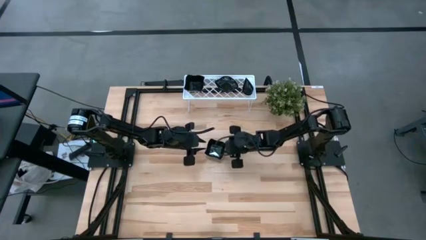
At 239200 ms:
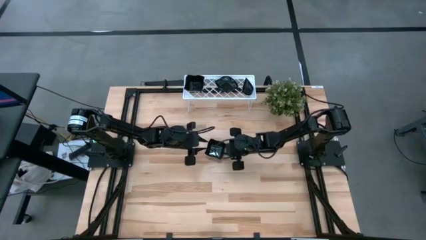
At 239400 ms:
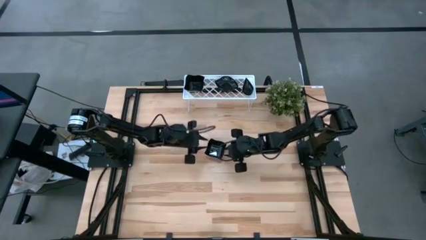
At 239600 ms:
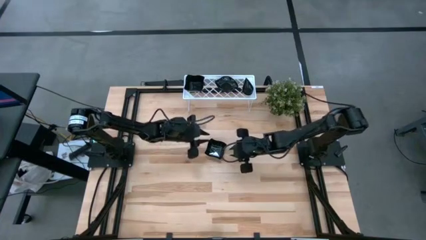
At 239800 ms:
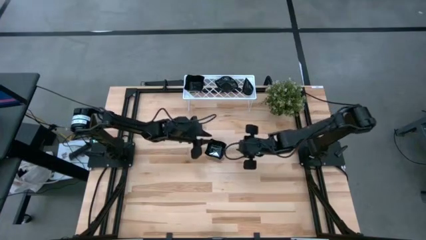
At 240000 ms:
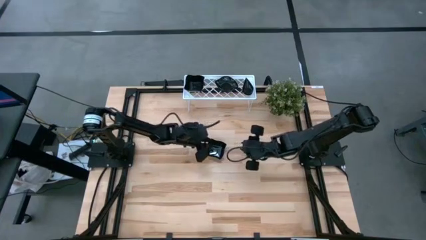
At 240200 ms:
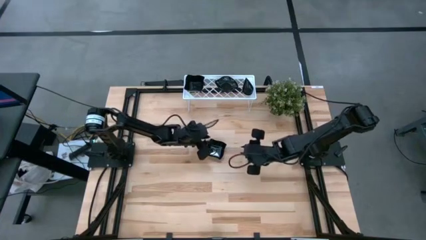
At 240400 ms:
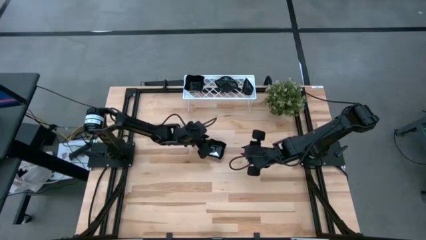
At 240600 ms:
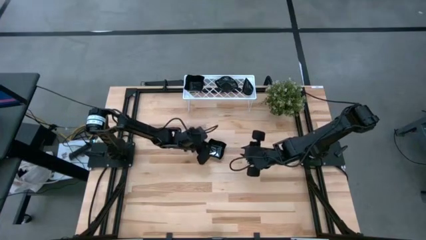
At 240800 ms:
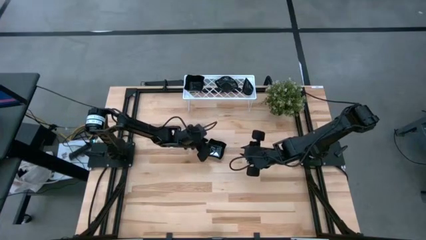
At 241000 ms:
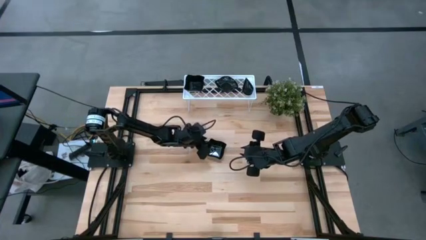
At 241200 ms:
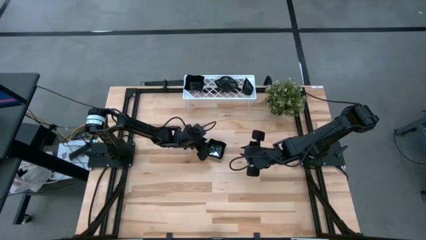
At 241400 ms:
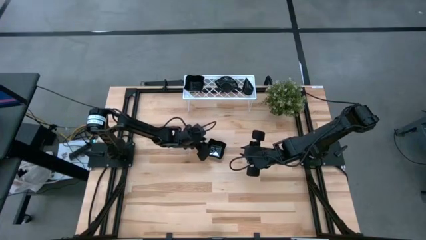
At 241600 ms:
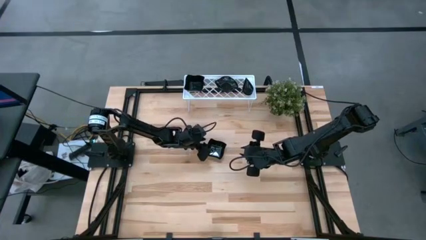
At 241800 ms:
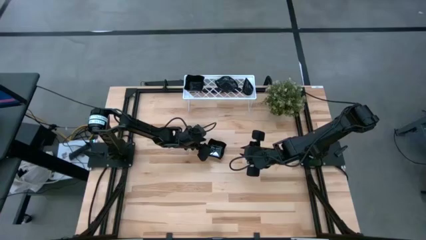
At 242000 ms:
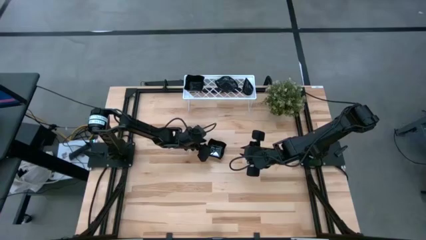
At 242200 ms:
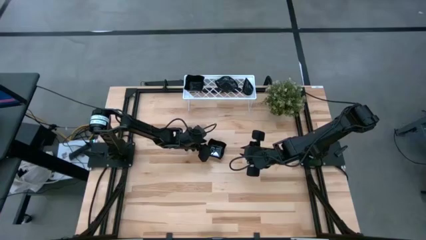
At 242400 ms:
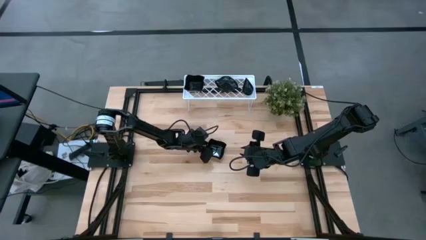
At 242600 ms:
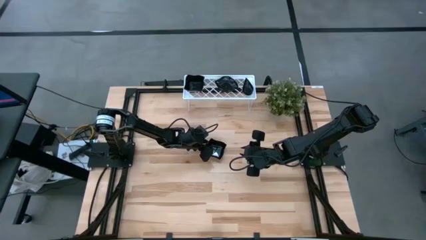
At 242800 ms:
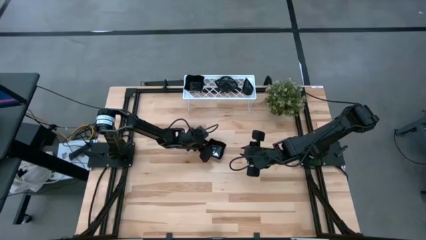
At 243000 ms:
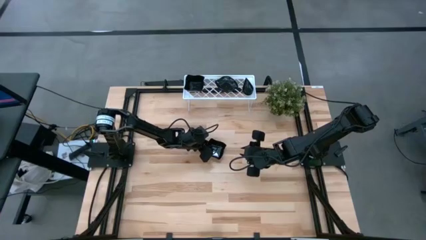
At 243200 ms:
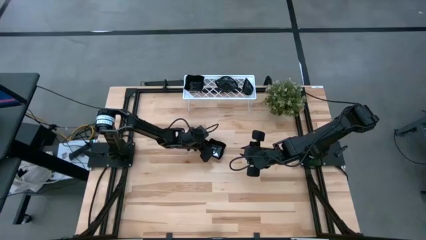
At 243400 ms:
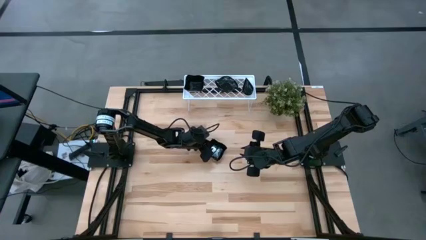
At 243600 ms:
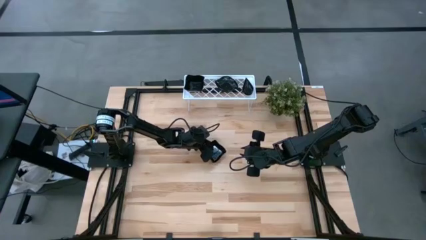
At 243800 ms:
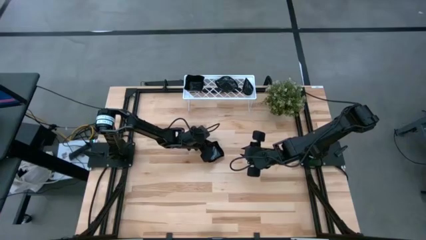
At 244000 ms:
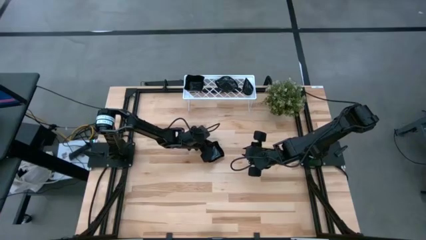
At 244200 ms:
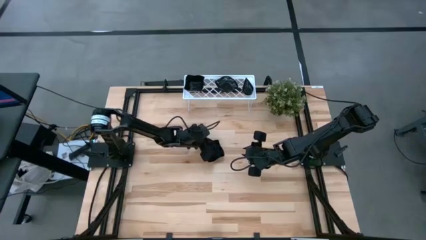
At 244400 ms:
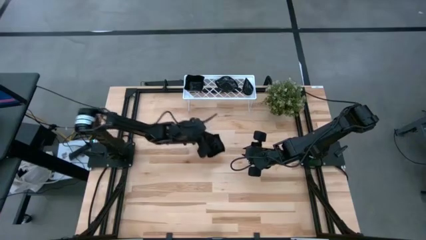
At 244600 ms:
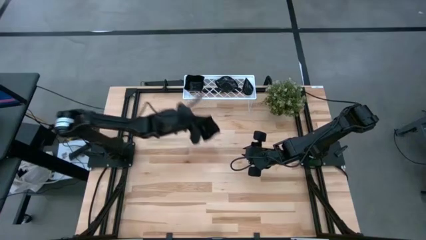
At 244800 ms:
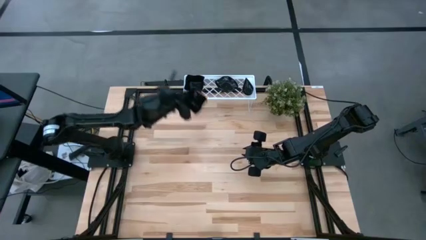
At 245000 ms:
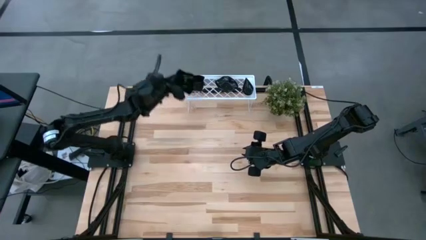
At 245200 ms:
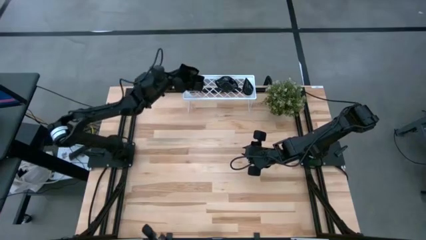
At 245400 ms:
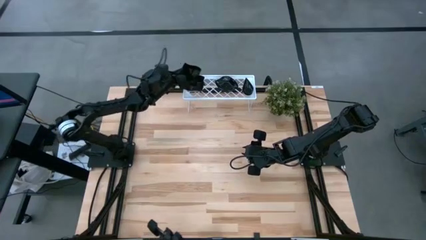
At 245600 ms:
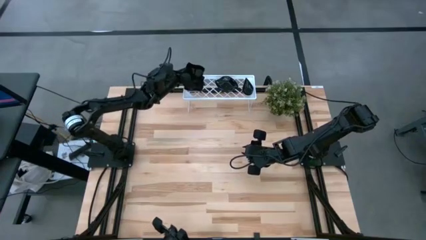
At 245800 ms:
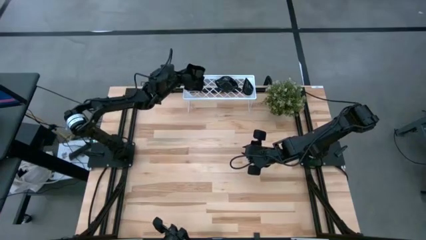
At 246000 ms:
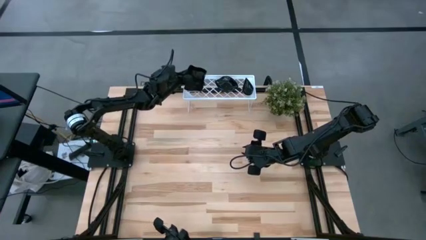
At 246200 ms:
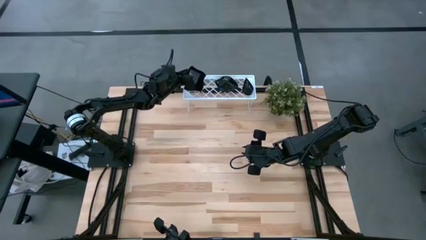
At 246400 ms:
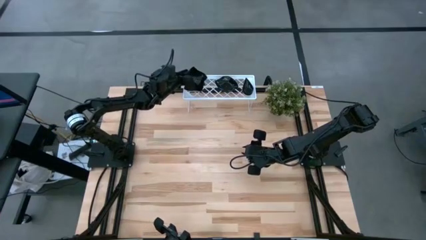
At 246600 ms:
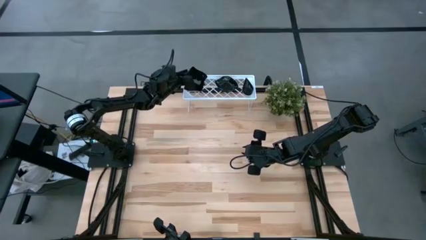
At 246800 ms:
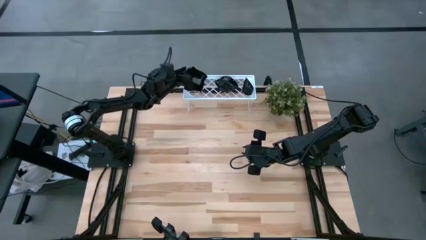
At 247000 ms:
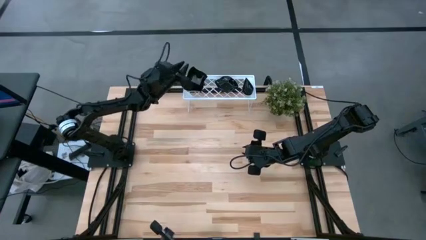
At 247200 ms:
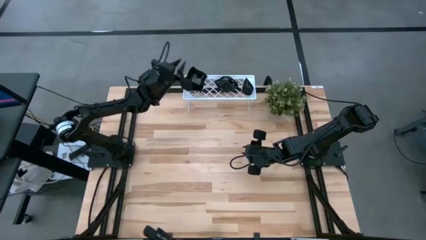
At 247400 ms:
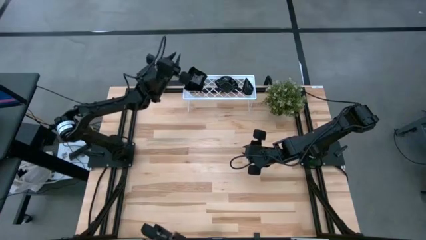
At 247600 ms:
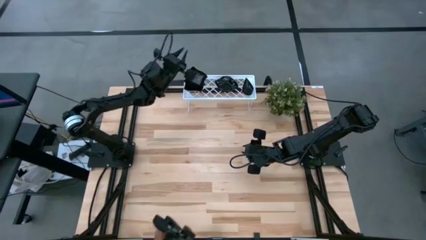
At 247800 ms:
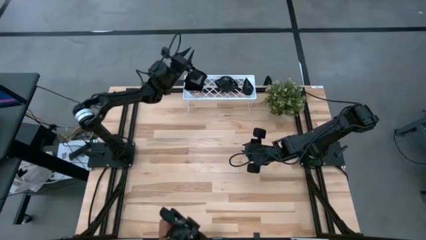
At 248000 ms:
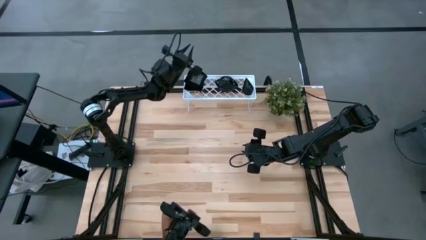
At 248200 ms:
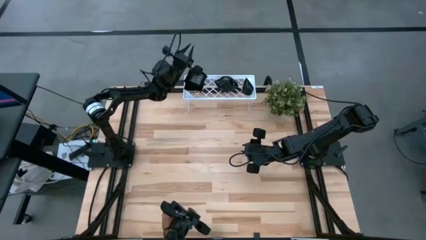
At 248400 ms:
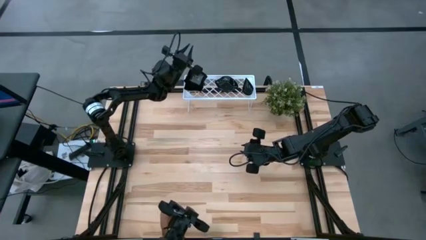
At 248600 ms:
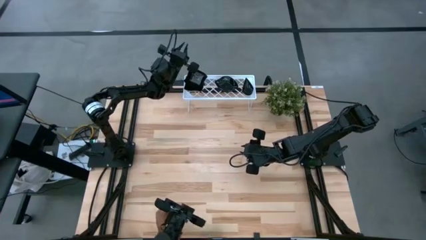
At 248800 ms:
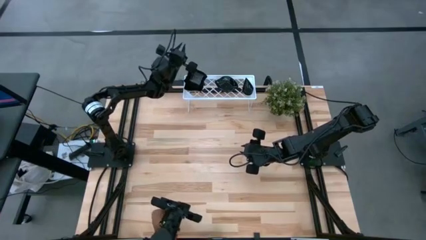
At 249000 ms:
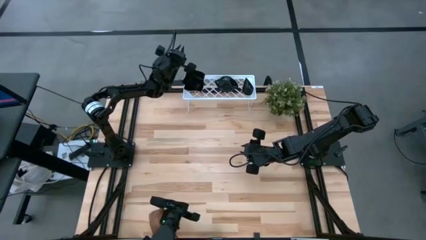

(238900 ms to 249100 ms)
Task: Pick & Place Mini shaped plates
Stack the distorted square plate on top of the distorted square plate on the shelf

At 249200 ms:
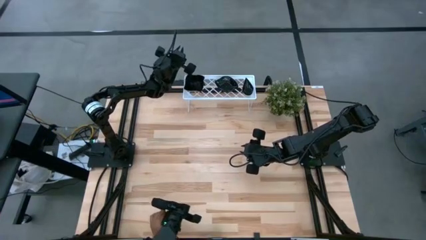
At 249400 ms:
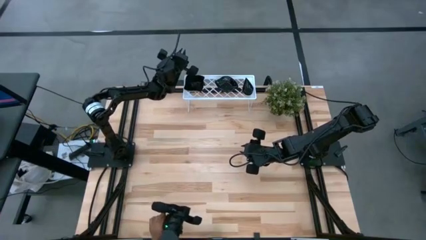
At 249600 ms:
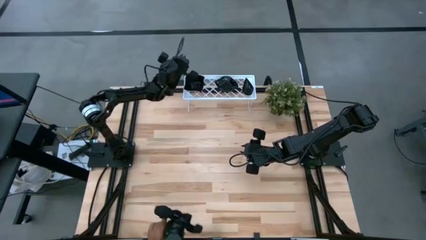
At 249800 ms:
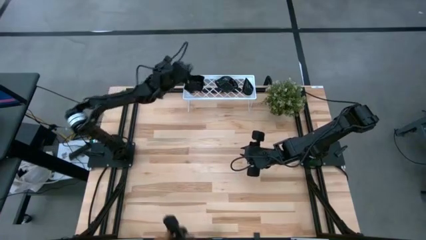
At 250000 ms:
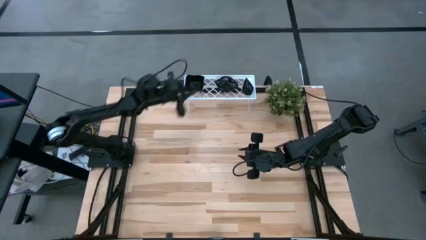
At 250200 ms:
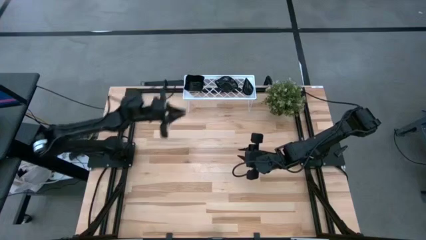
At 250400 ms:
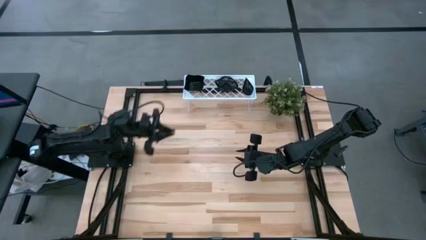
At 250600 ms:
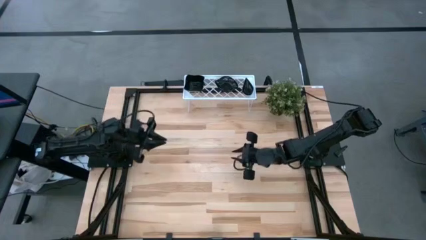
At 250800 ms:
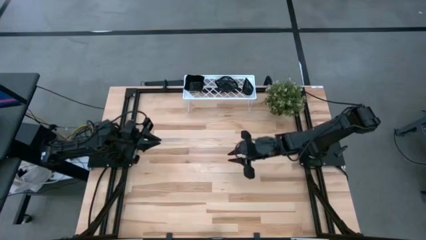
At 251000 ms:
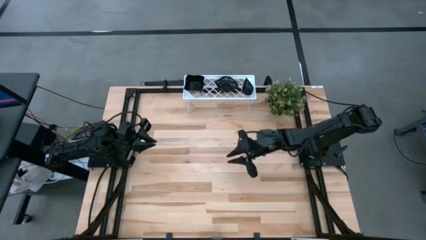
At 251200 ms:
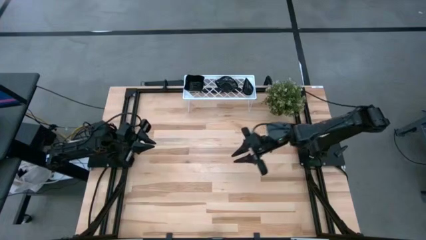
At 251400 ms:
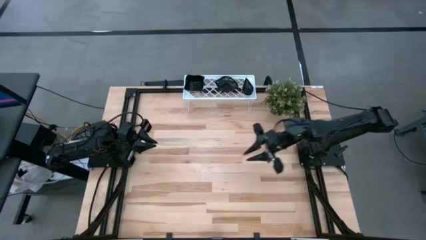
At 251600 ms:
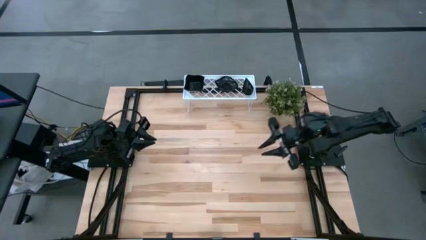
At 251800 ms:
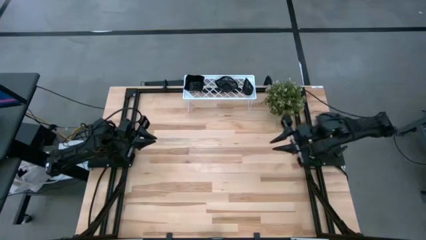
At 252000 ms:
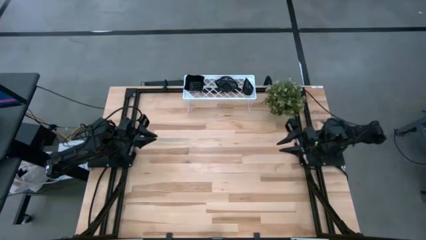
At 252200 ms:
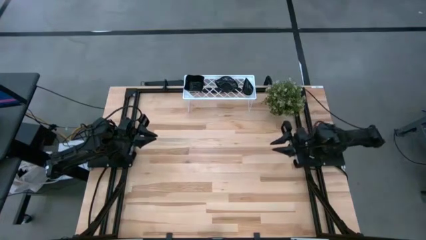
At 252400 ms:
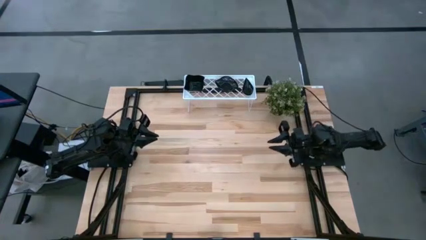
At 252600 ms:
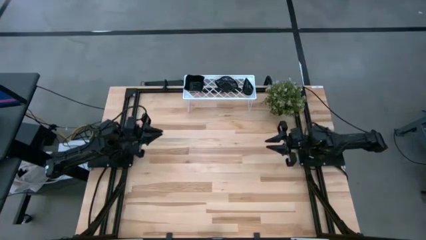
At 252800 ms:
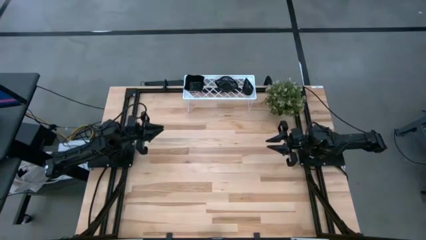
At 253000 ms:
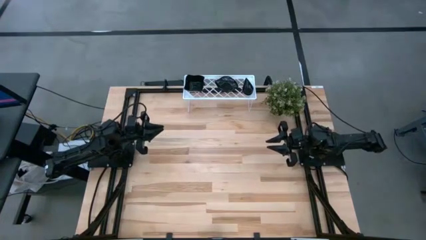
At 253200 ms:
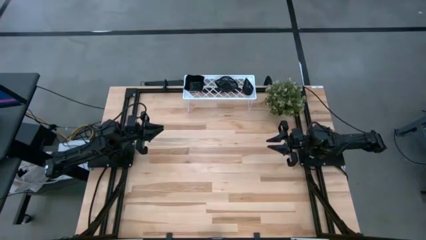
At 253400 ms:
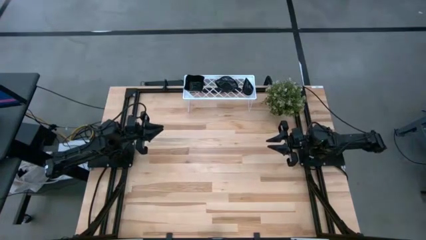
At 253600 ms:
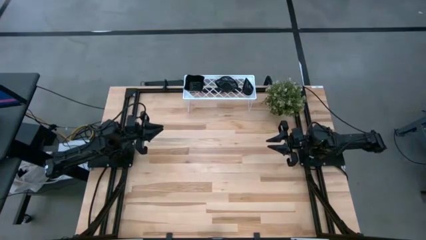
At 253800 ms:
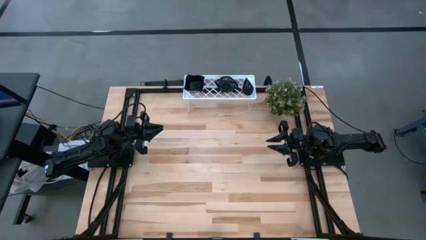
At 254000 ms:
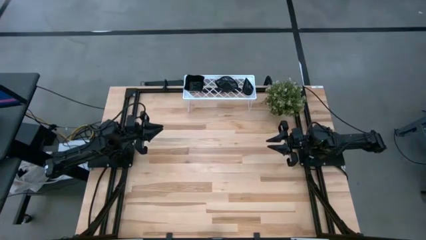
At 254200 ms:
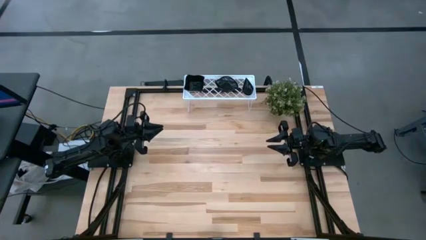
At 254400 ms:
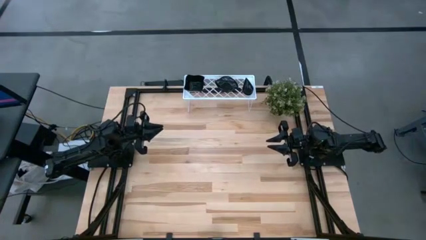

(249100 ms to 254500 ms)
Return to Home Position

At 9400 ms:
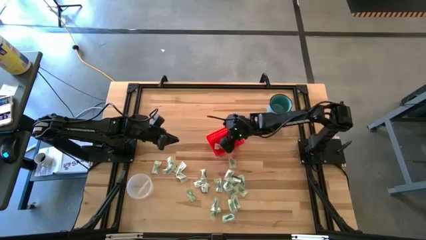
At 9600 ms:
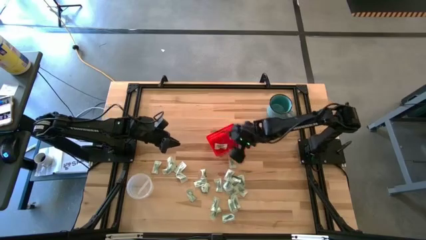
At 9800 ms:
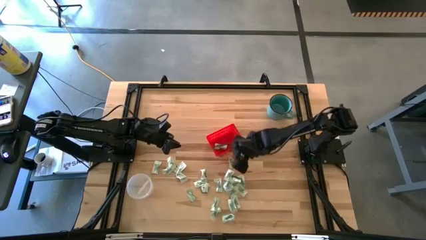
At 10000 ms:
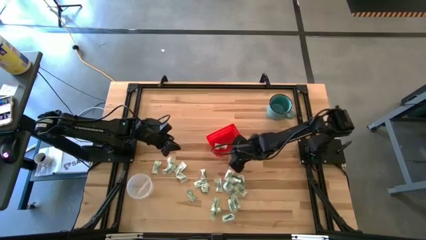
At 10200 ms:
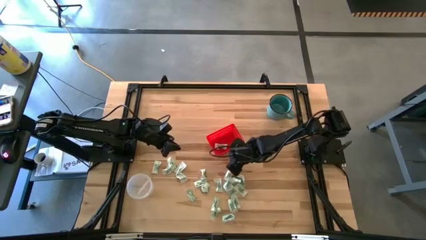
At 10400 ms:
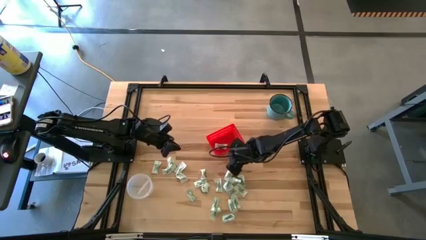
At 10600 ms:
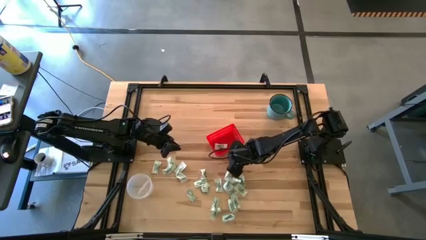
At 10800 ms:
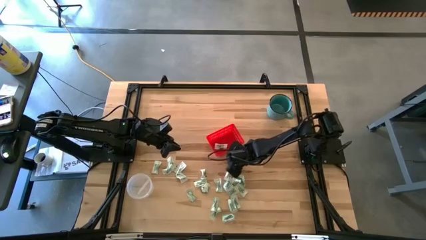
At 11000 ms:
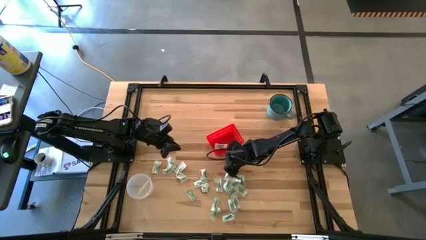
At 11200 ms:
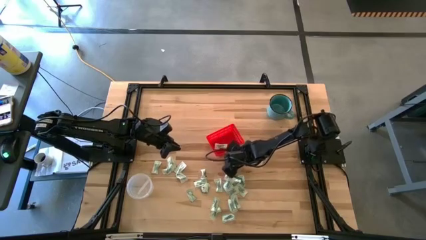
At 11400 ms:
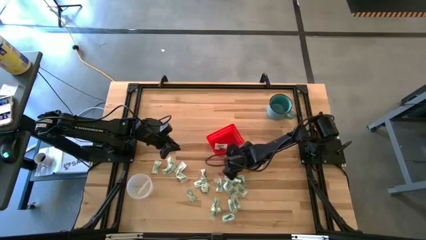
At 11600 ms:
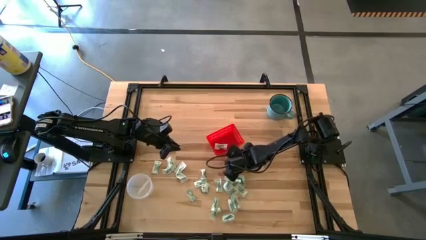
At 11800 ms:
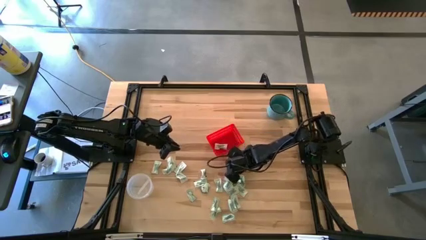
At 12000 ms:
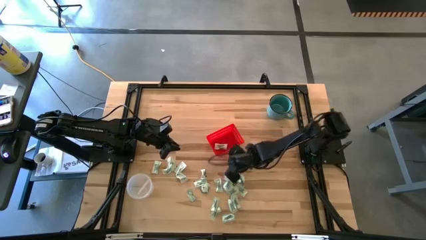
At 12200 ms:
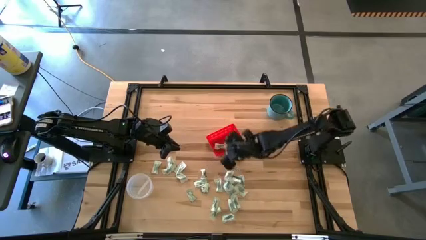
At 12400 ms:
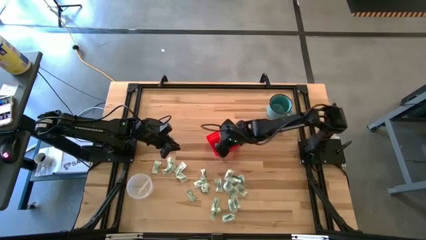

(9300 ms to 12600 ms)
Task: Pick and place items into bin
Put the stevia packet into the red bin
